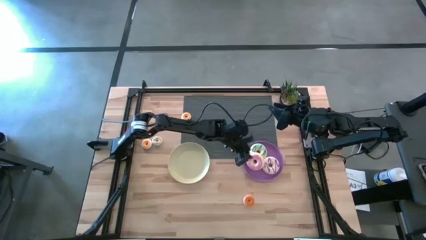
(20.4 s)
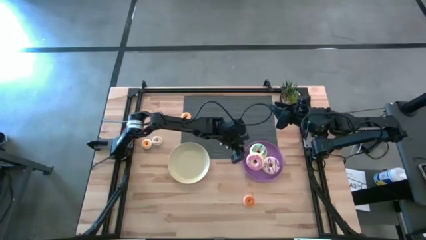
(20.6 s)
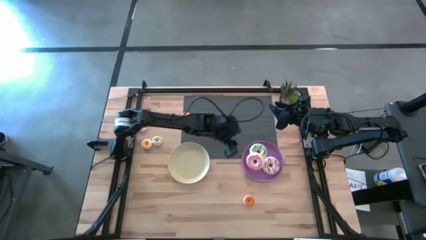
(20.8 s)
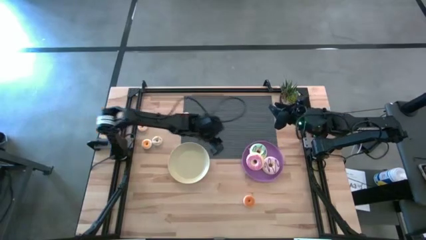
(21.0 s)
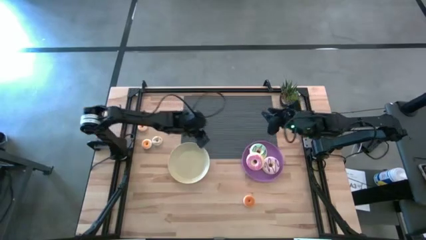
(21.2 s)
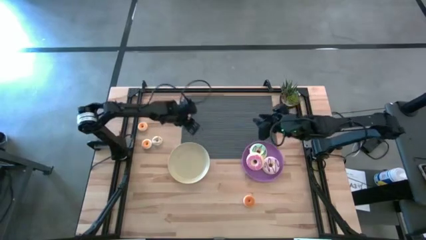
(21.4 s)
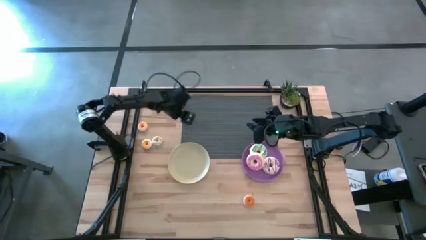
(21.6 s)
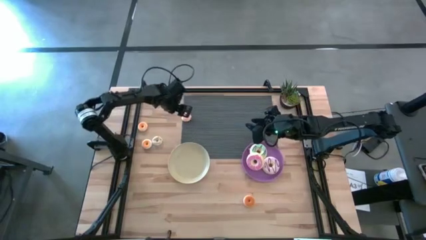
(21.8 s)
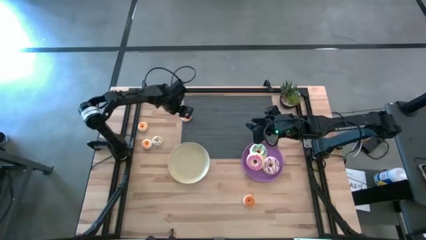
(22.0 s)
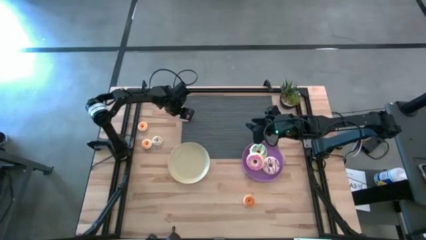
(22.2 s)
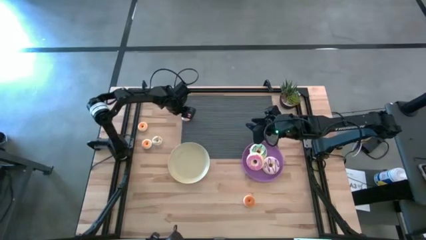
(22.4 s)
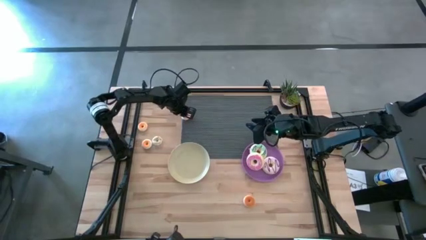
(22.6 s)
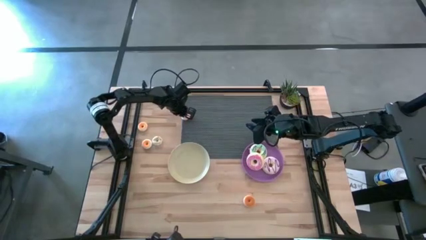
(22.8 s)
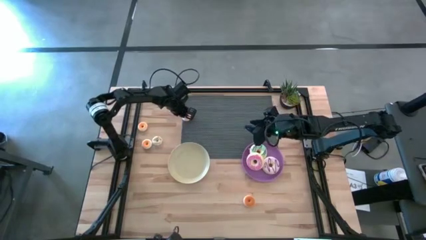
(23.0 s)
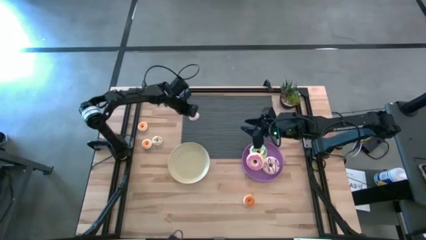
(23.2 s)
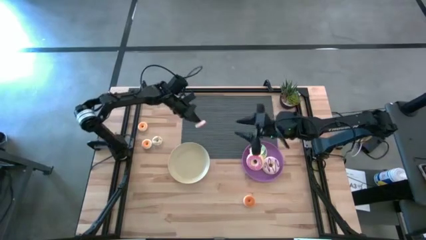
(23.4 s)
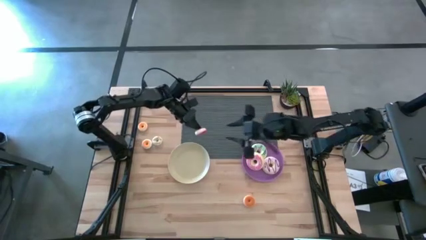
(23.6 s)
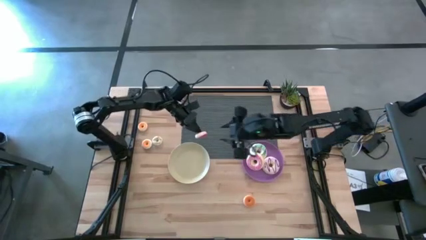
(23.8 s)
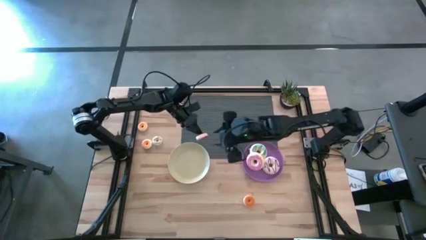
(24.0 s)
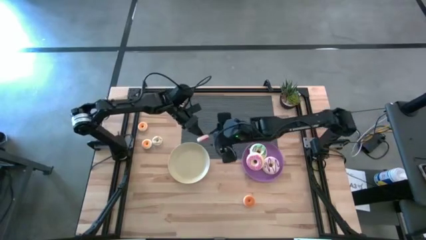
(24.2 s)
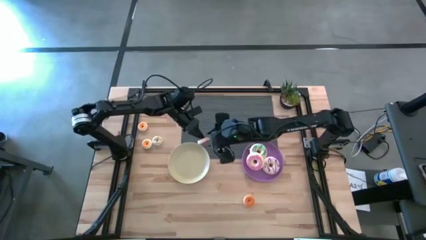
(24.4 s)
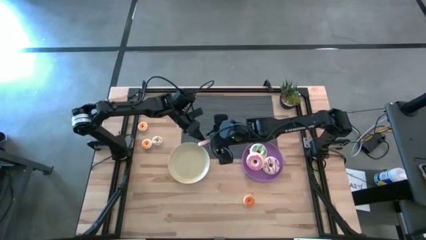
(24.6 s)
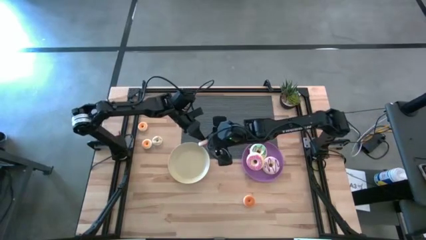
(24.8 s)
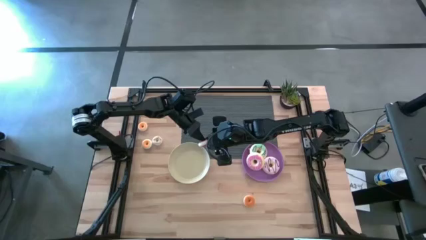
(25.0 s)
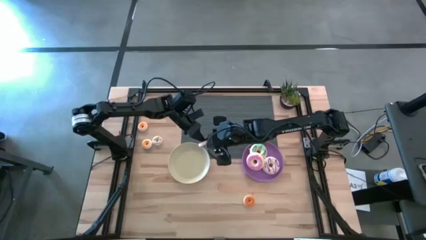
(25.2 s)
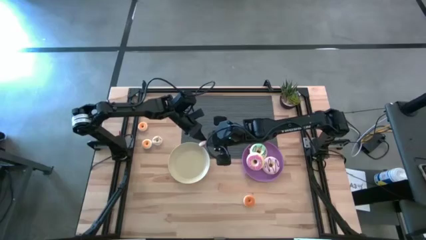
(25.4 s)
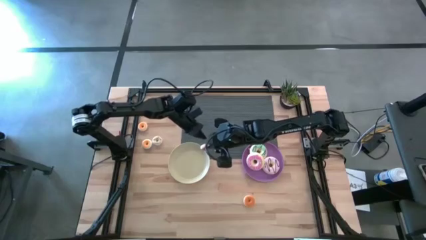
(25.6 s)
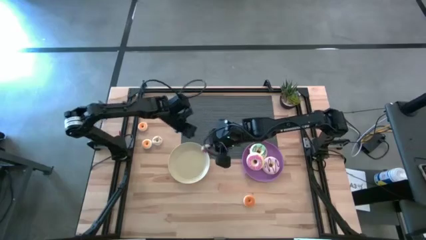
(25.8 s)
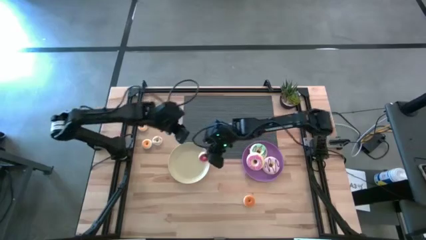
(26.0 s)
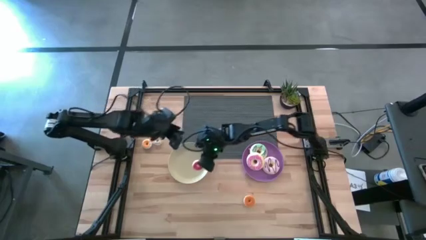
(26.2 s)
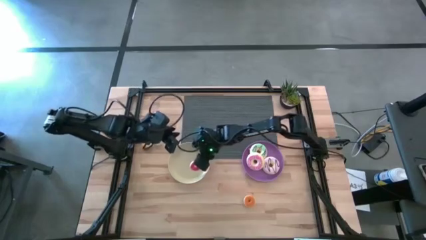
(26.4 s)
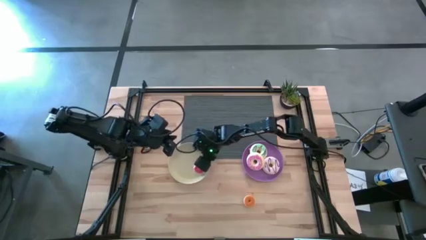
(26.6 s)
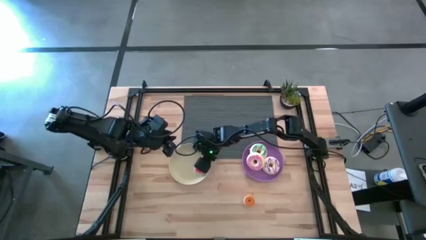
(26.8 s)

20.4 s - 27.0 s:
Task: Pick & Place donuts
Put the small red donut on the white plate

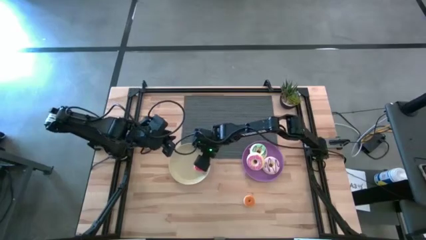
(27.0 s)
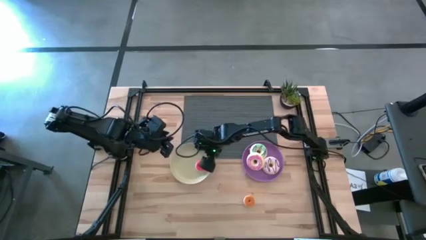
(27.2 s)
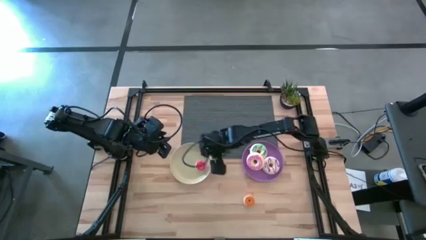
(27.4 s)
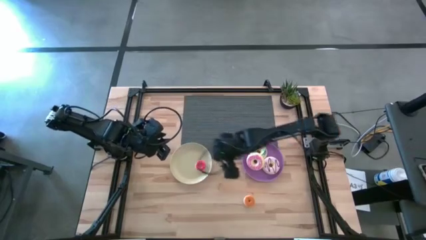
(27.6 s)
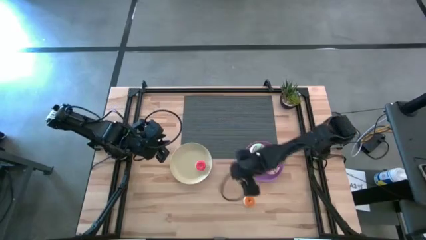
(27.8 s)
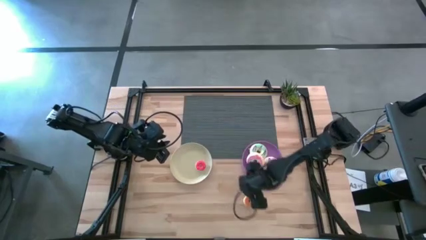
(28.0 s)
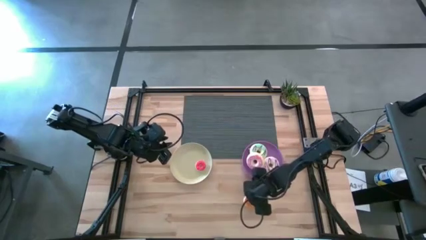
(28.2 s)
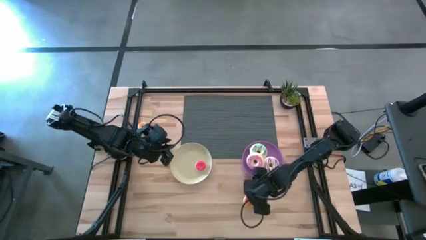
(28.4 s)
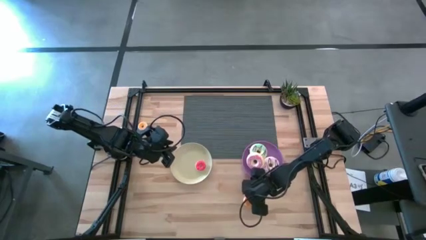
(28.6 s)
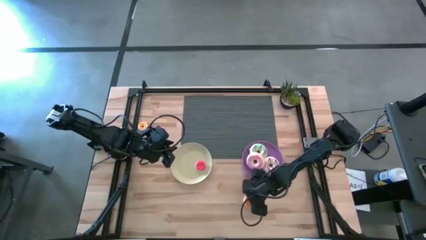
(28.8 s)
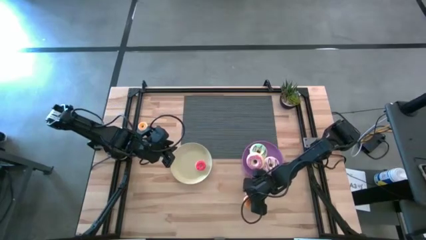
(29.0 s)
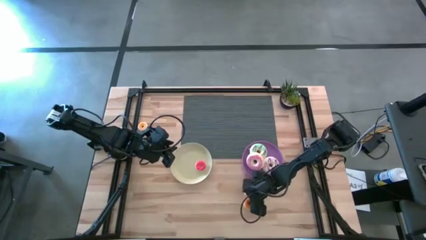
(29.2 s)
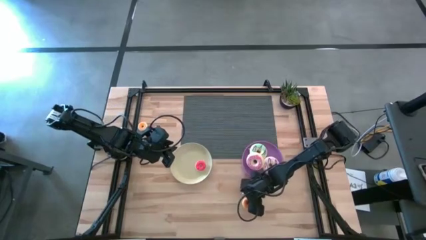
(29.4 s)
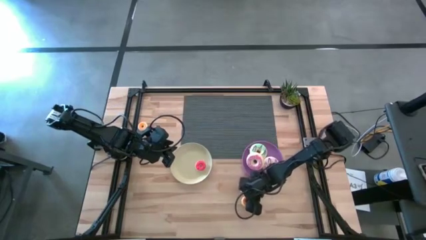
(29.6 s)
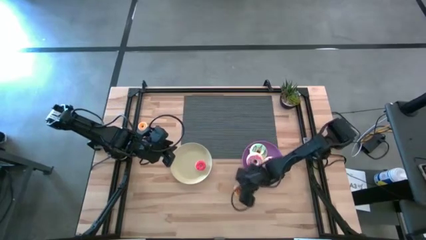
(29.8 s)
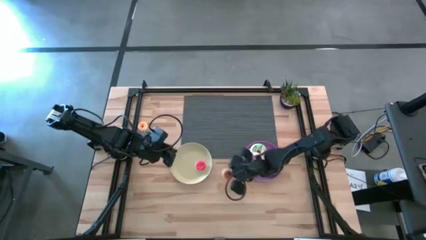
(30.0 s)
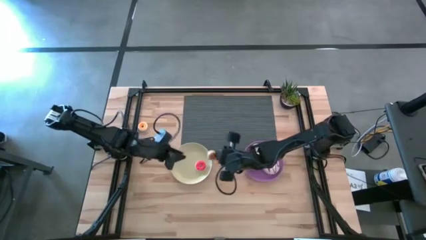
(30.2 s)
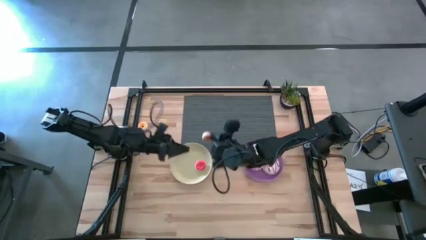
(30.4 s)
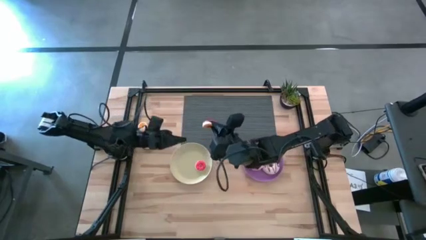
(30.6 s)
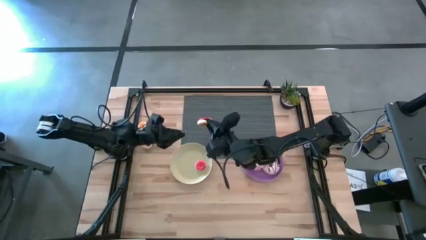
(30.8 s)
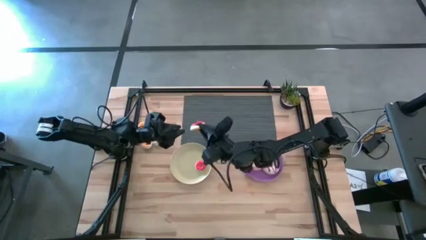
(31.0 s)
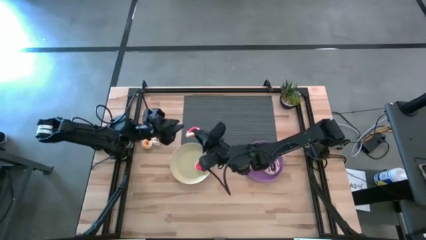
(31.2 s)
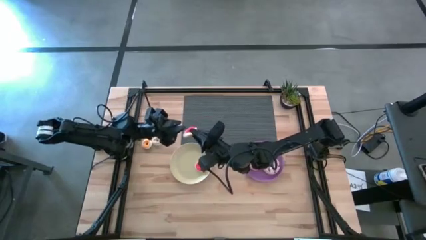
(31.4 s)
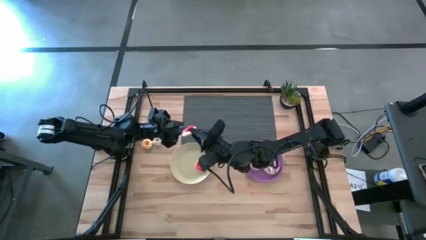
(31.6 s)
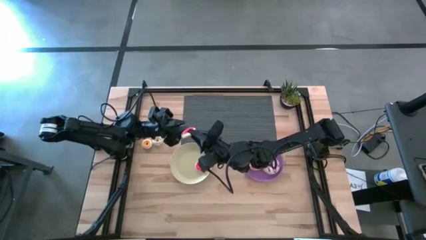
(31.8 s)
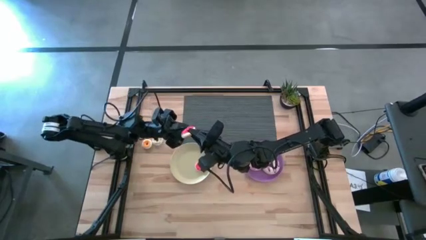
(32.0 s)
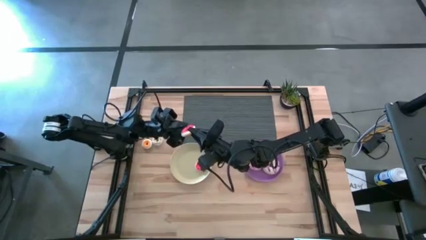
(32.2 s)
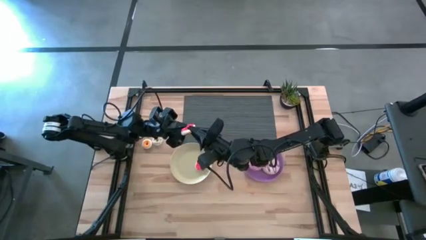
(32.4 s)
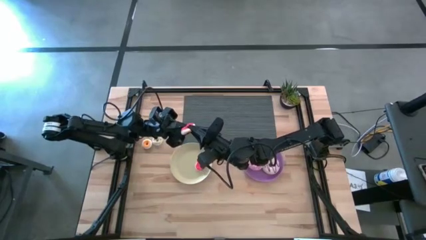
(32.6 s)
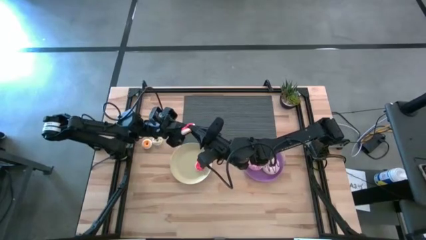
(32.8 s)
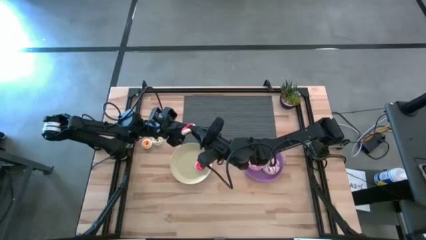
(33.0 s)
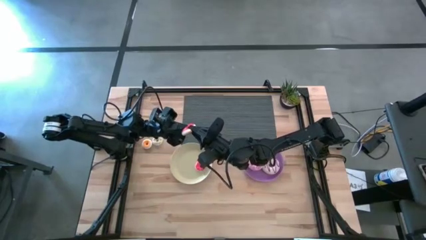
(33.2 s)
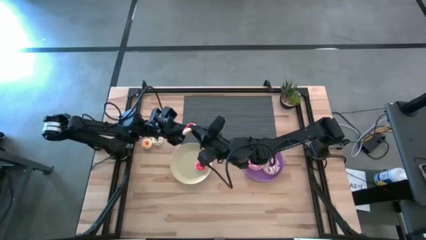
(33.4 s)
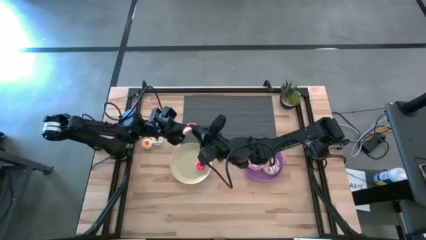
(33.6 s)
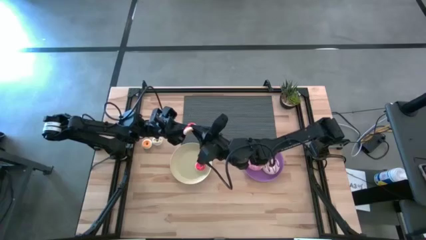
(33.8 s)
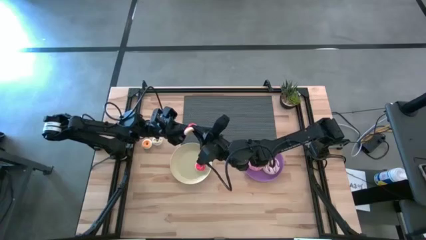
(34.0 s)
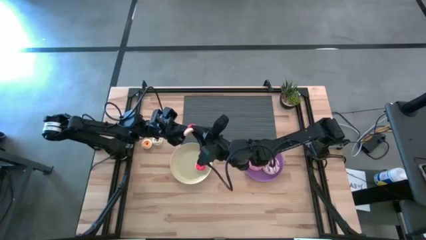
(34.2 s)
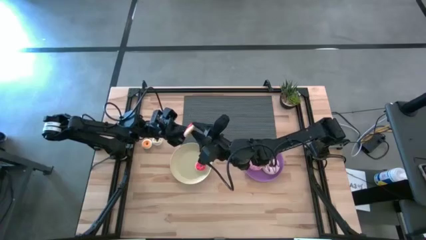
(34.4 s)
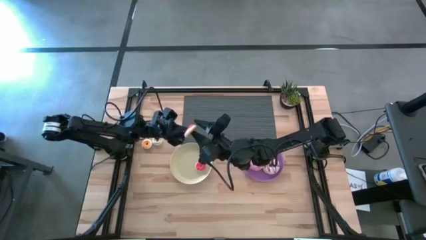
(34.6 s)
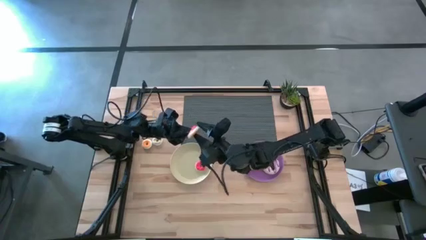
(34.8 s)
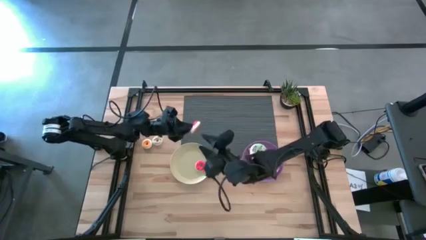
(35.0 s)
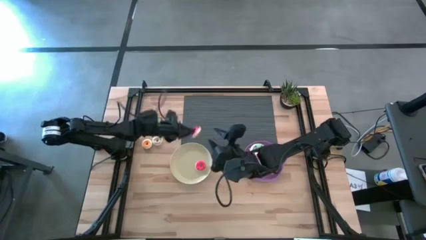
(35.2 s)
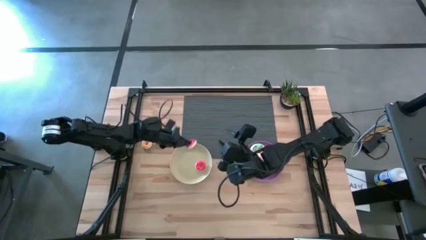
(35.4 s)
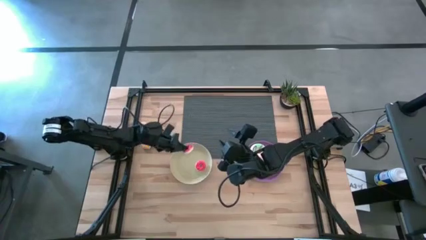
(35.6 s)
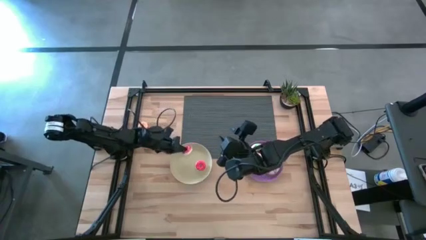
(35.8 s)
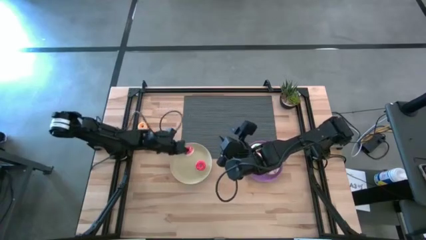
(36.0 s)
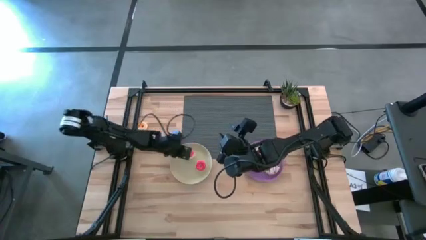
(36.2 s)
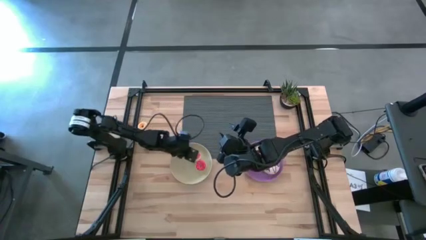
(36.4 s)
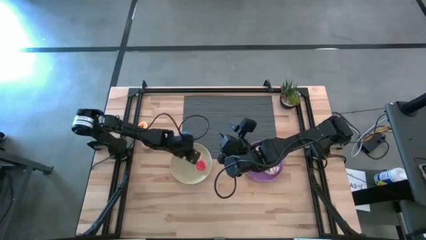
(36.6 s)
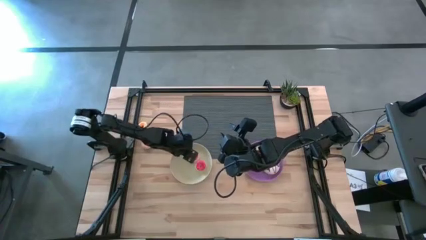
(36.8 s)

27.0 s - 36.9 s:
Put the small orange donut on the white plate
